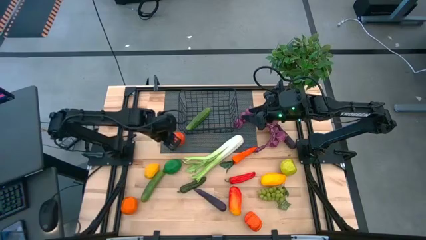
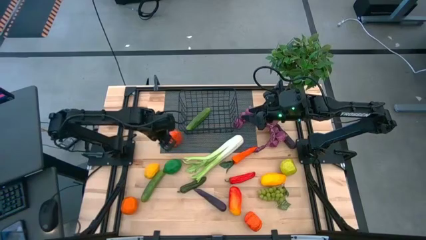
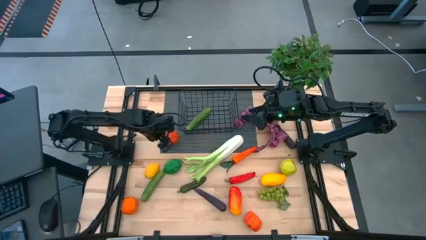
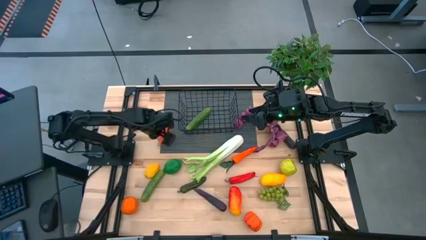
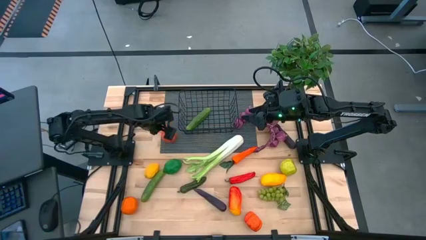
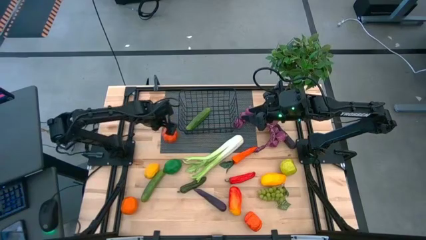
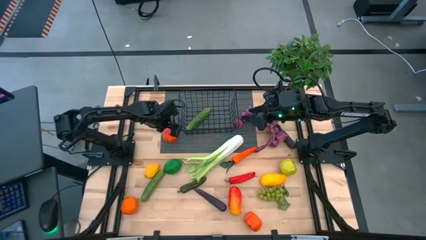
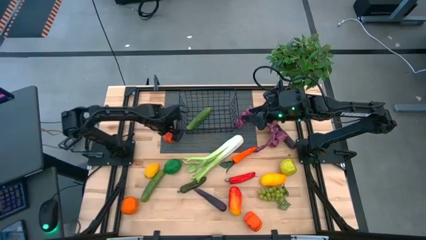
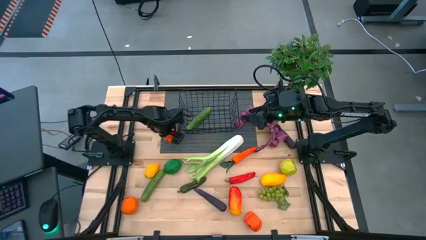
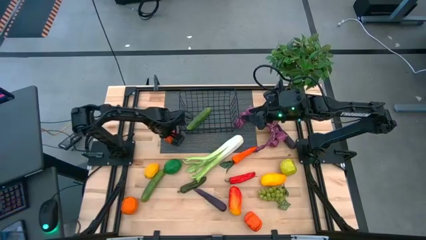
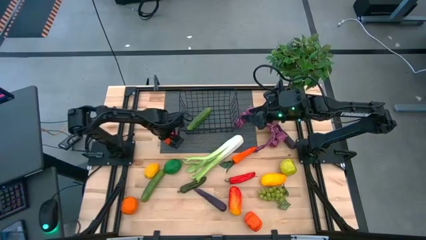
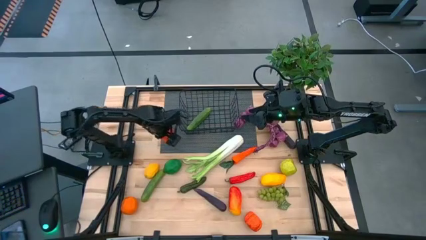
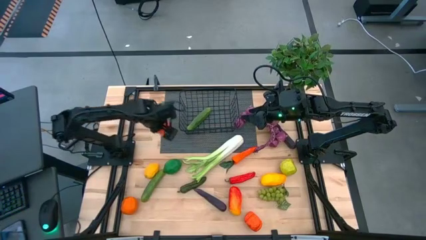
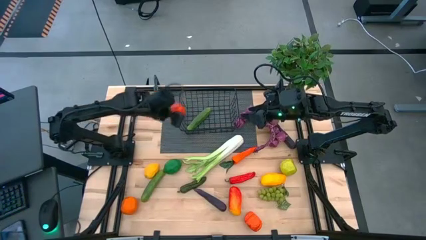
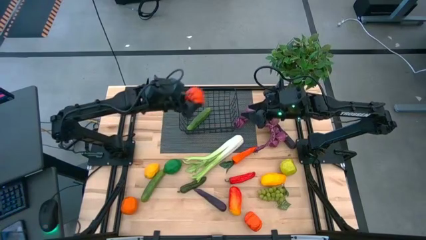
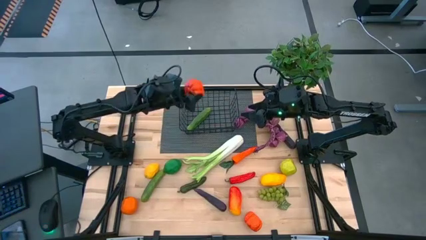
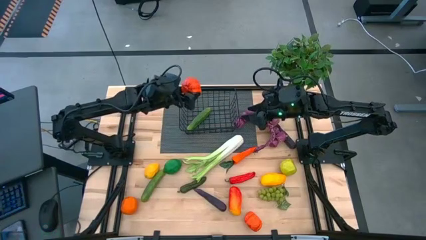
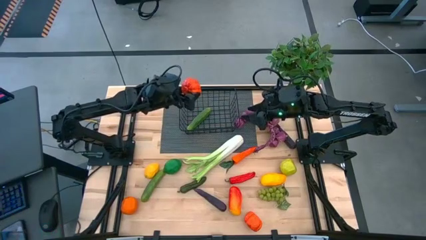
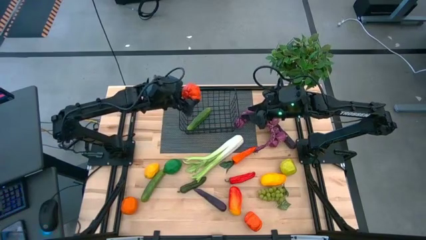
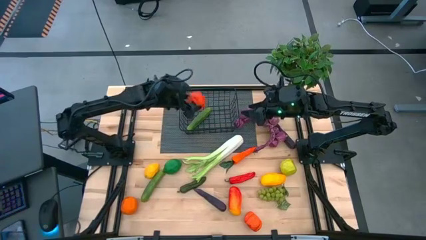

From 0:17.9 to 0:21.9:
Task: Build produce basket
Put the top squash into the wire basket

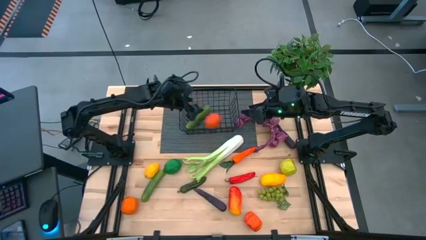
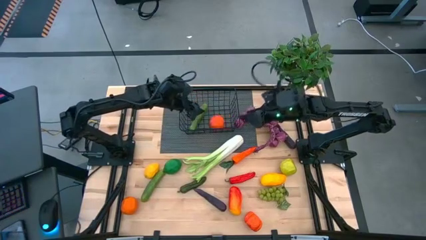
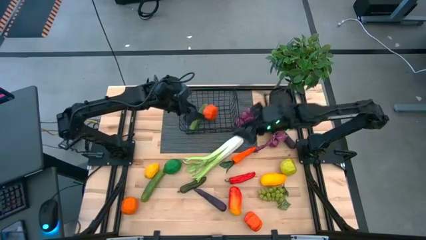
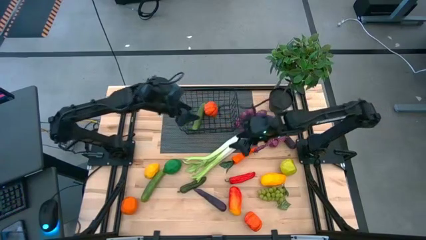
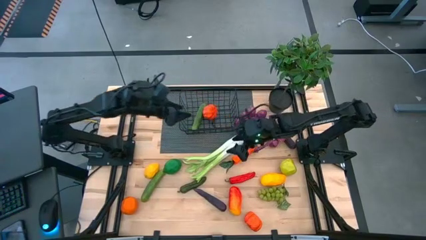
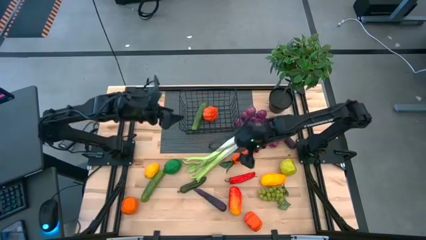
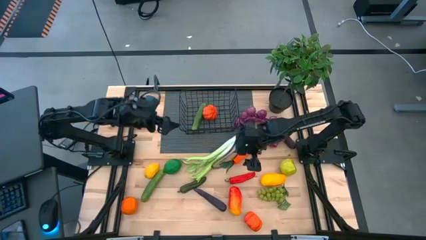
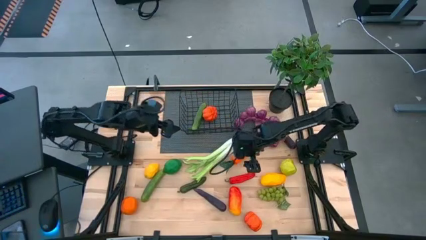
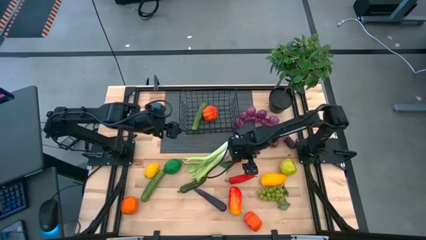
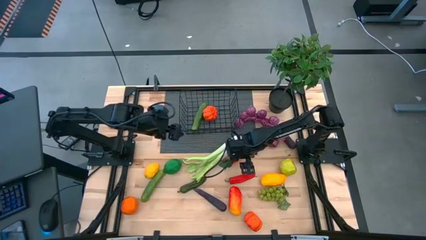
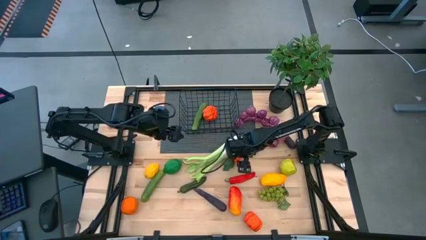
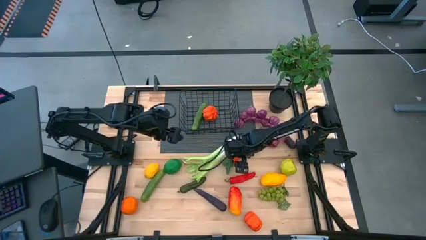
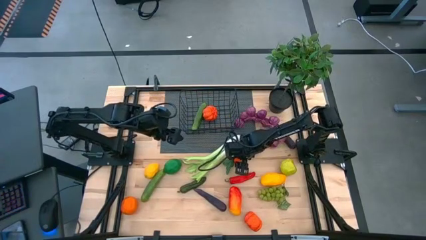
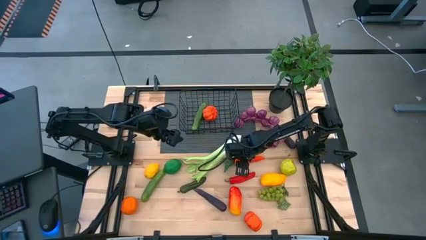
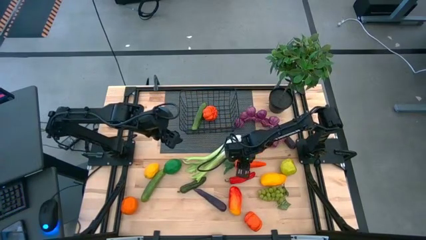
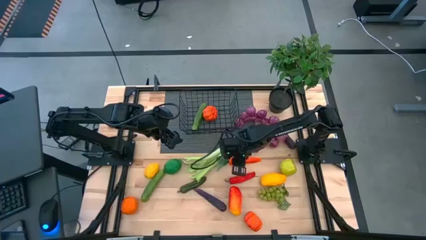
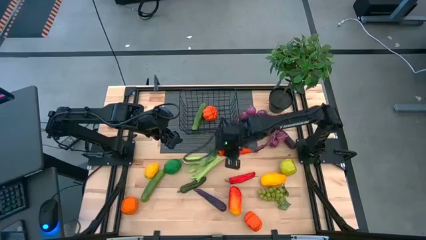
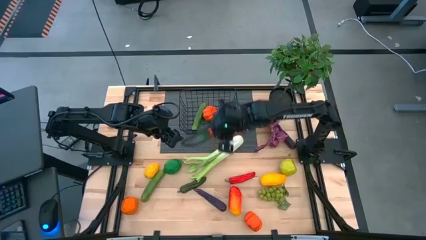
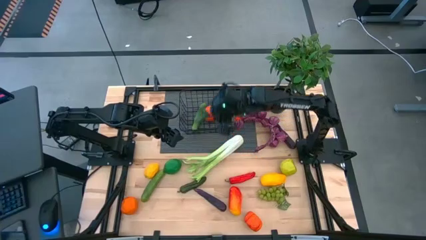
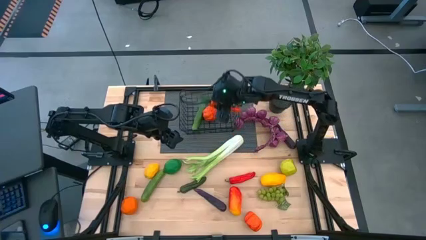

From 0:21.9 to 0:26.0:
Put the carrot into the wire basket

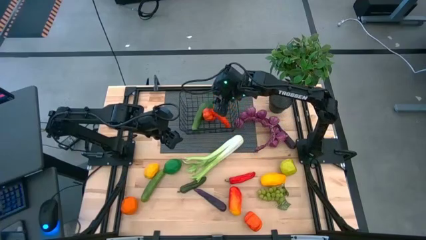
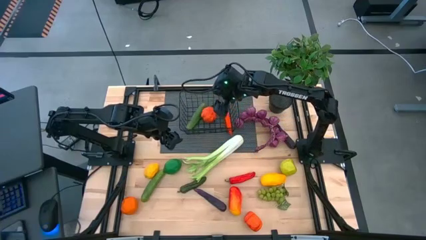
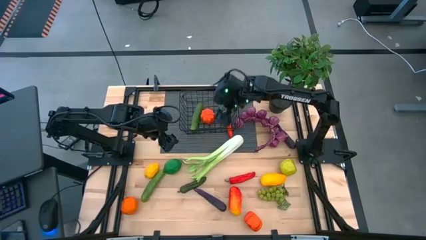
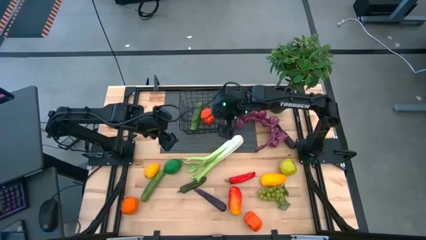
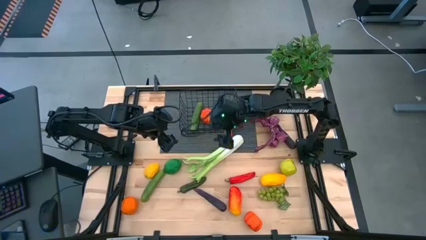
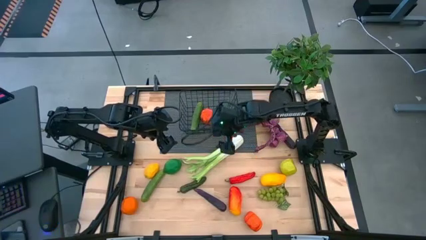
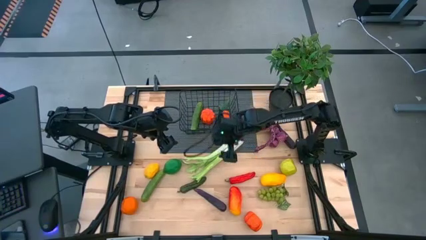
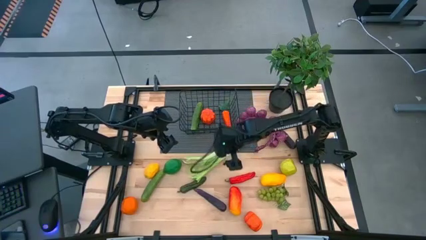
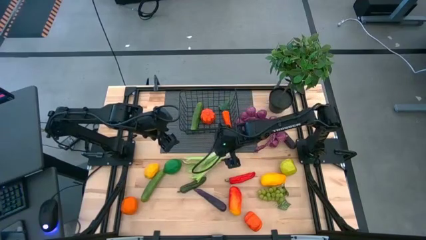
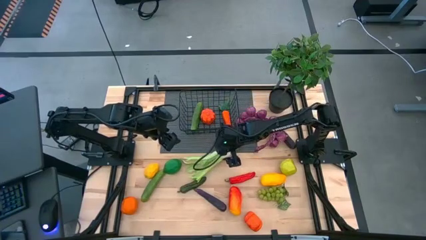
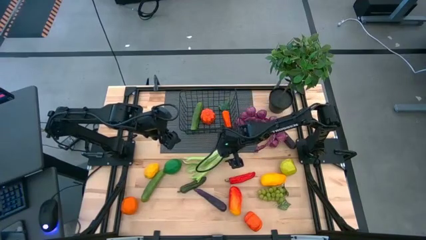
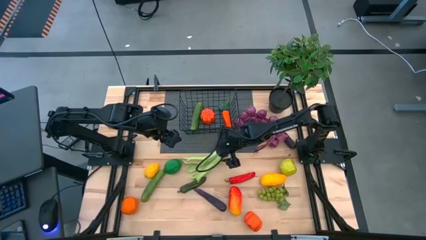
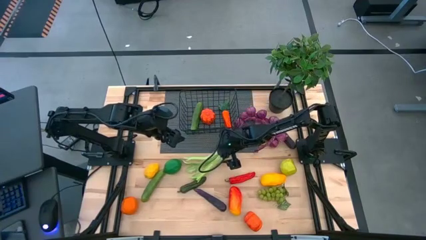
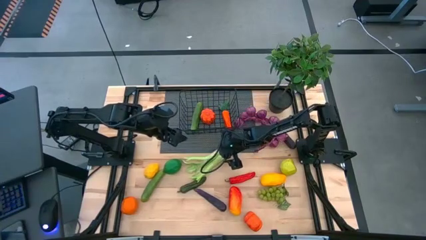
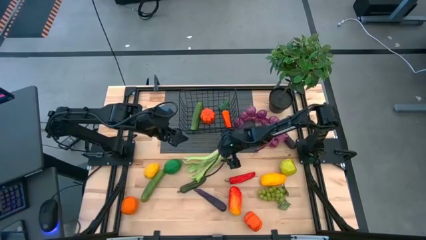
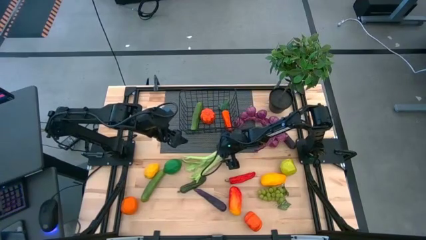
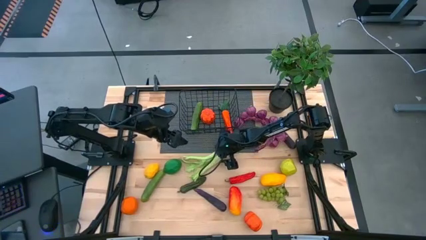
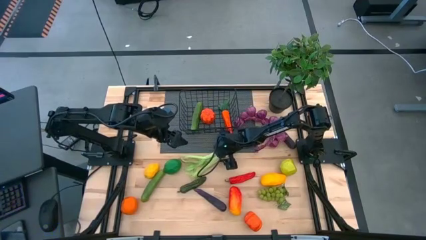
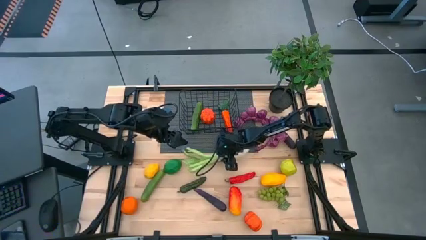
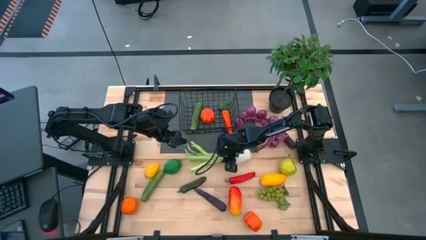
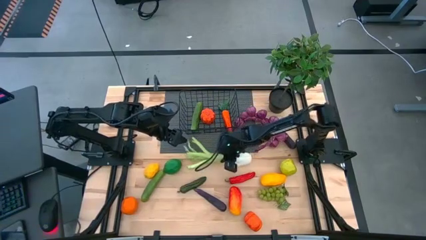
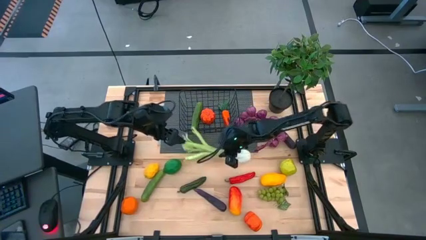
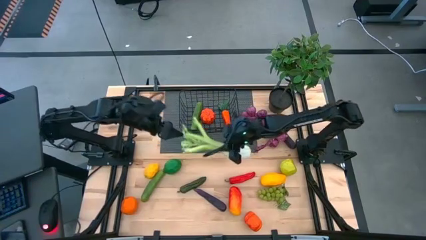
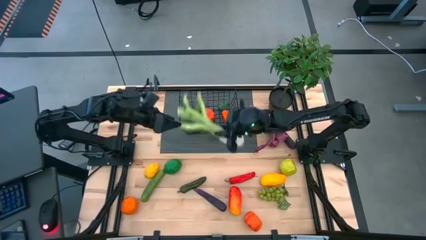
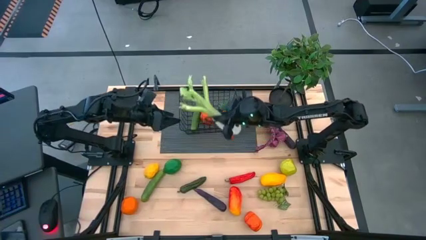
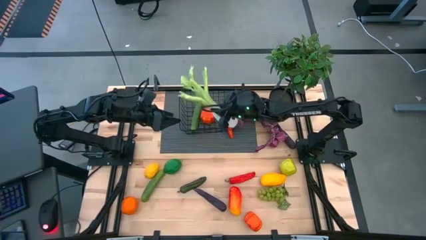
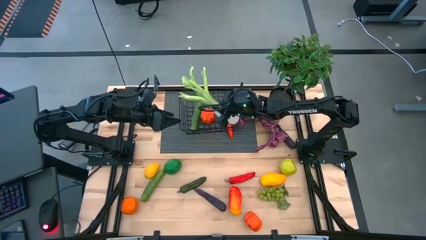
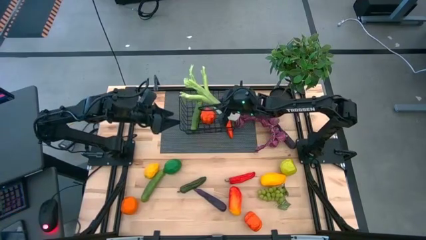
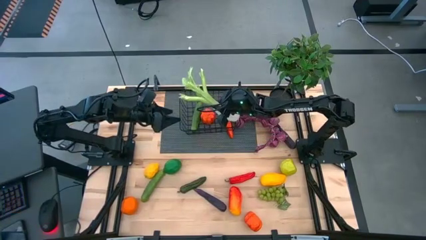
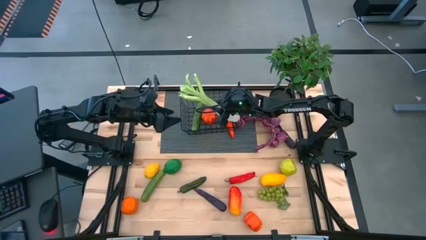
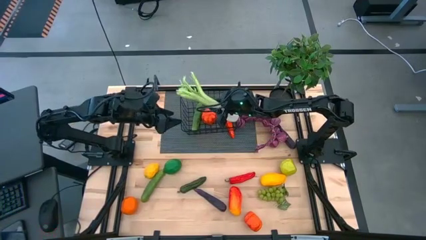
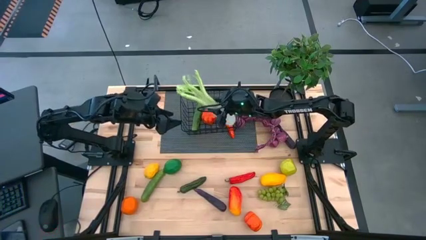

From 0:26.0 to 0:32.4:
Put the celery into the wire basket

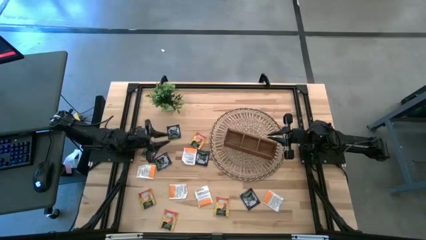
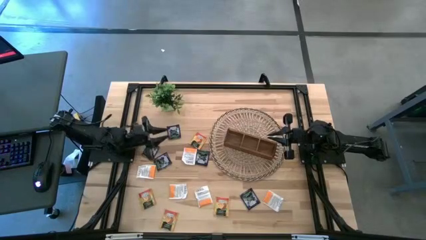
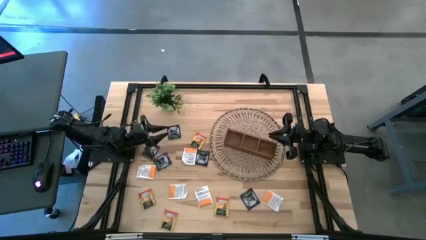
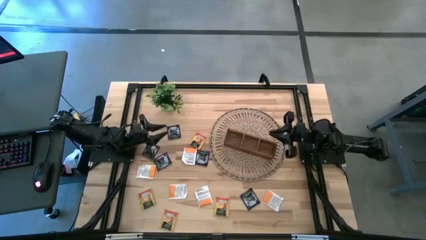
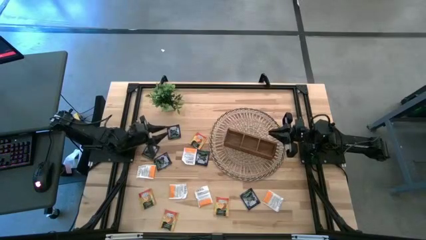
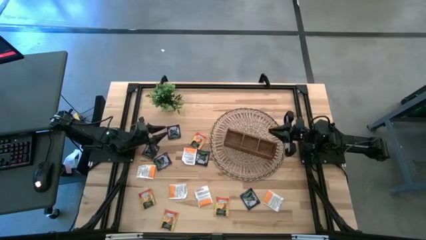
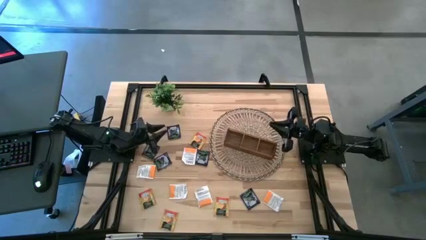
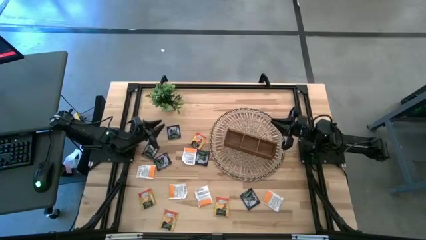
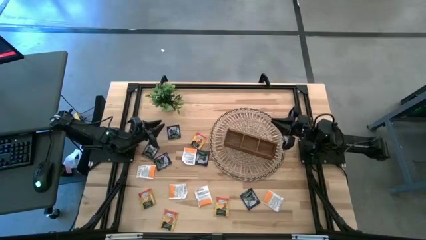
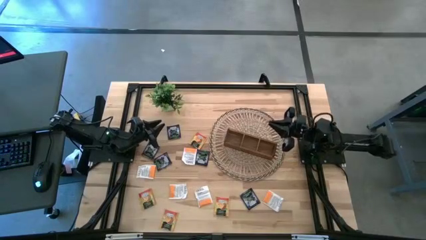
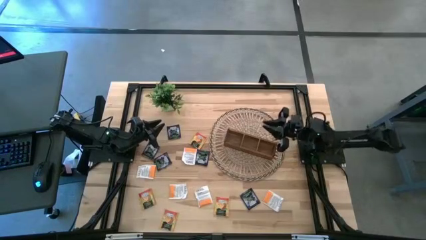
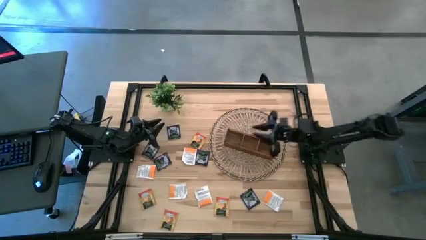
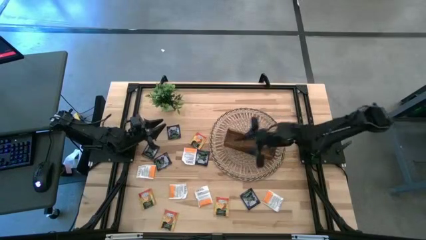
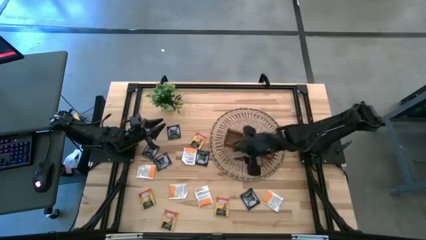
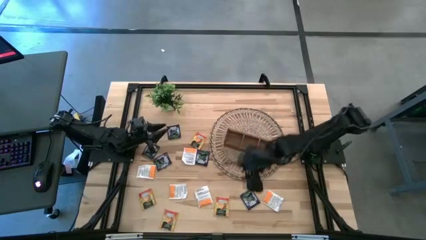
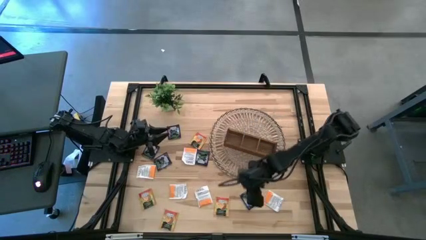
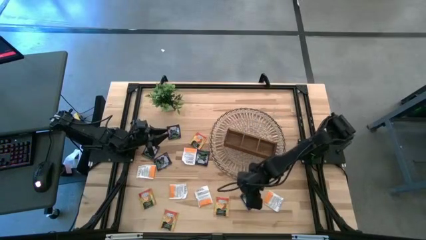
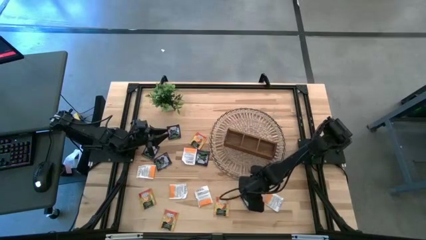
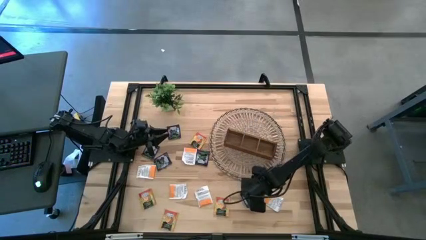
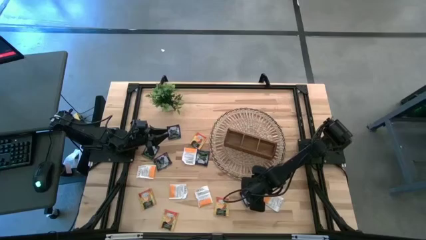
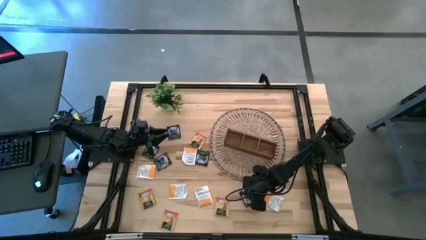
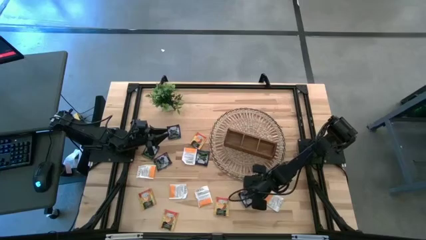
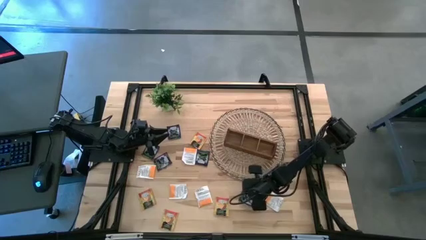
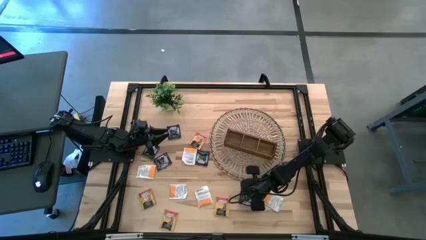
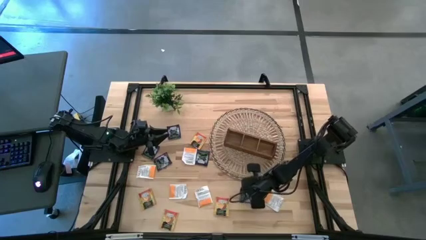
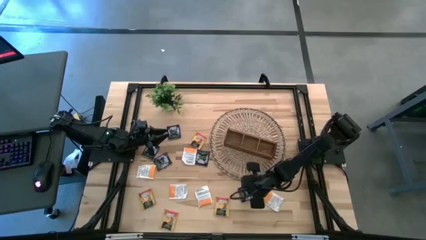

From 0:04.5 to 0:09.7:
Task: Pick & Place Tea
Put the violet tea bag into the left section of the wooden organizer
